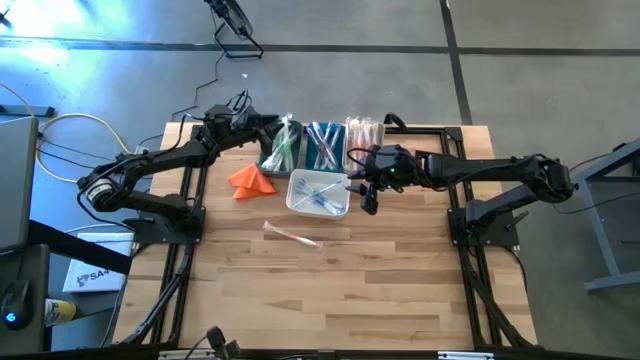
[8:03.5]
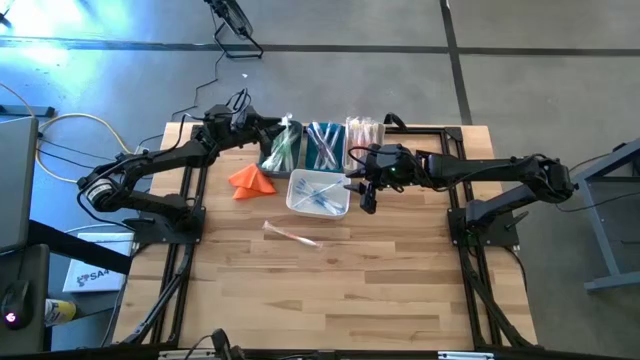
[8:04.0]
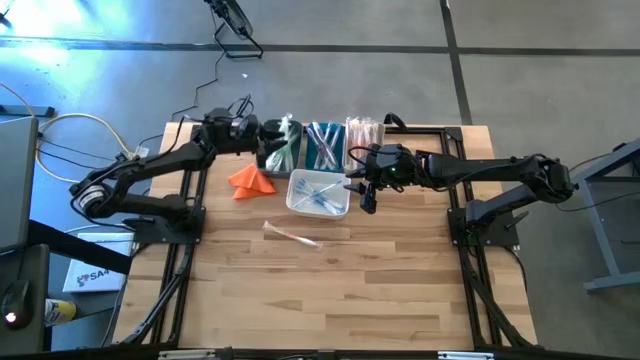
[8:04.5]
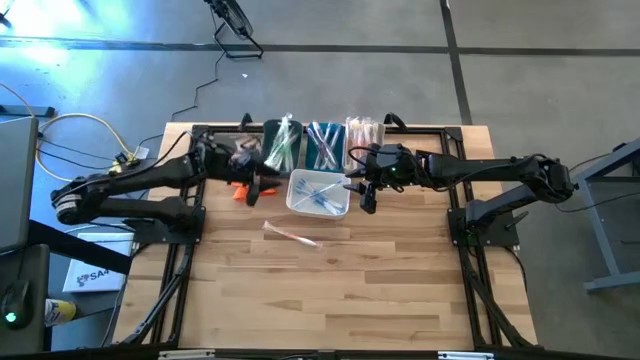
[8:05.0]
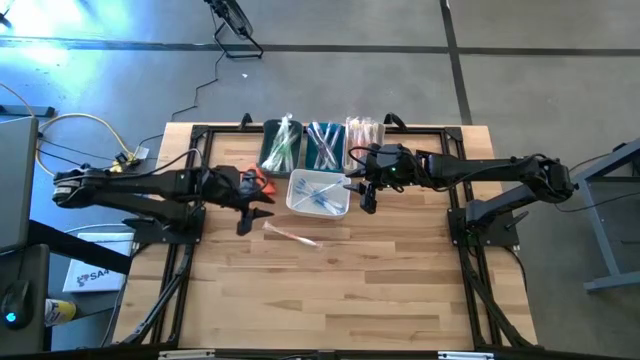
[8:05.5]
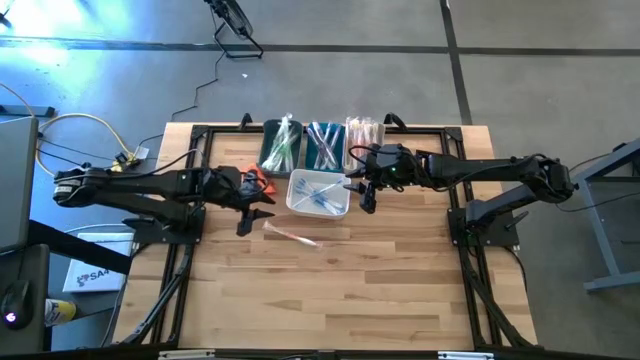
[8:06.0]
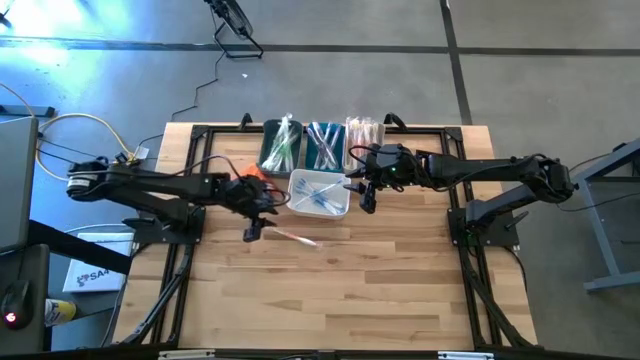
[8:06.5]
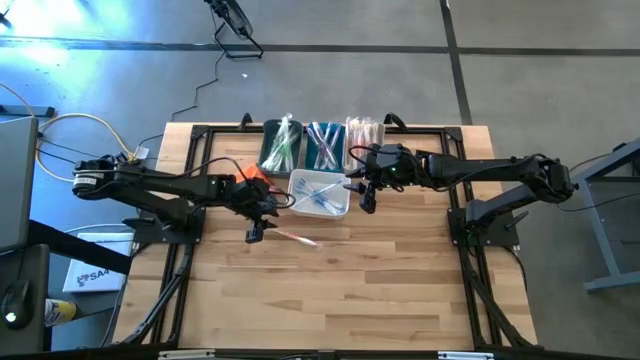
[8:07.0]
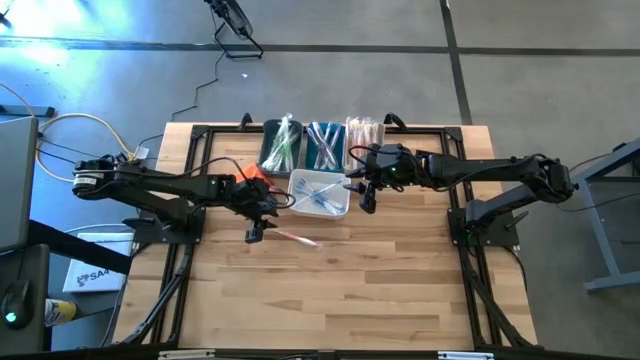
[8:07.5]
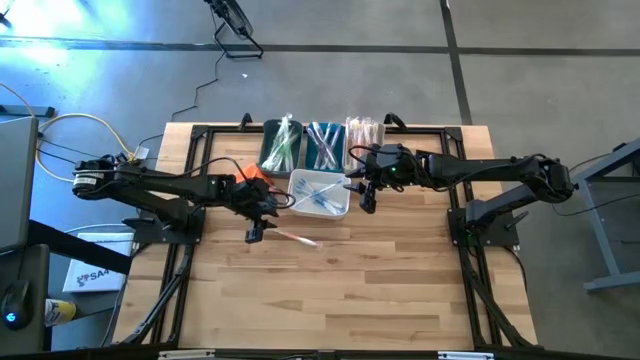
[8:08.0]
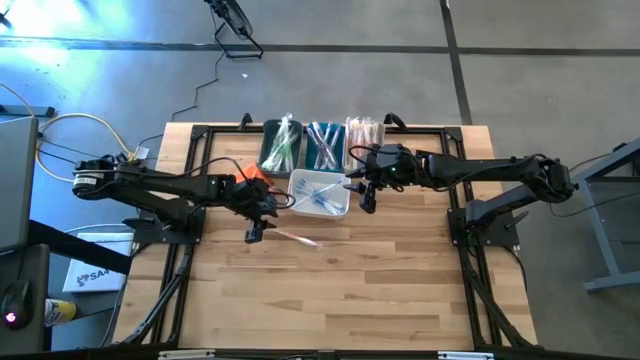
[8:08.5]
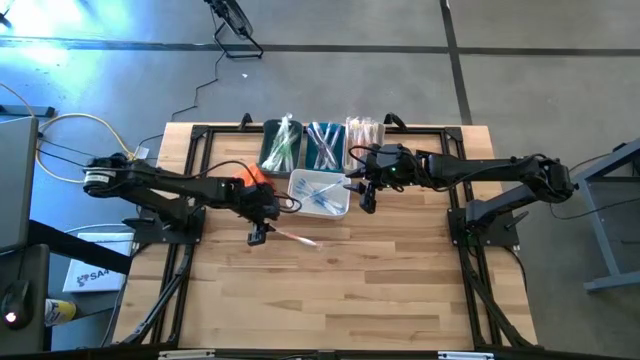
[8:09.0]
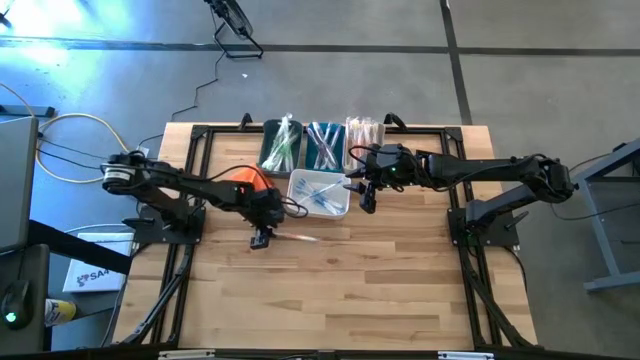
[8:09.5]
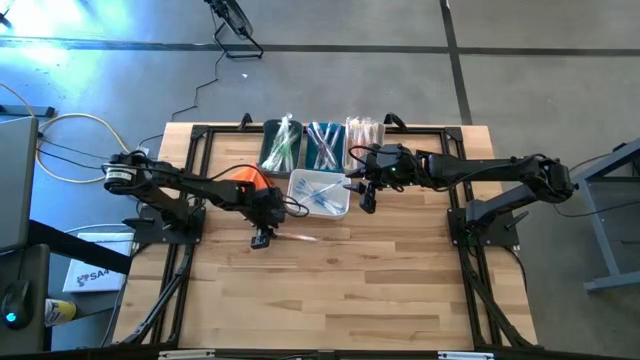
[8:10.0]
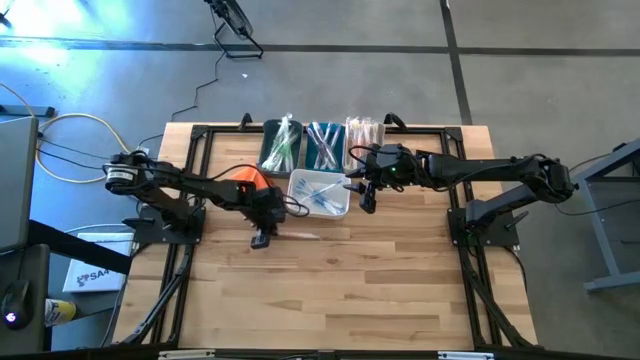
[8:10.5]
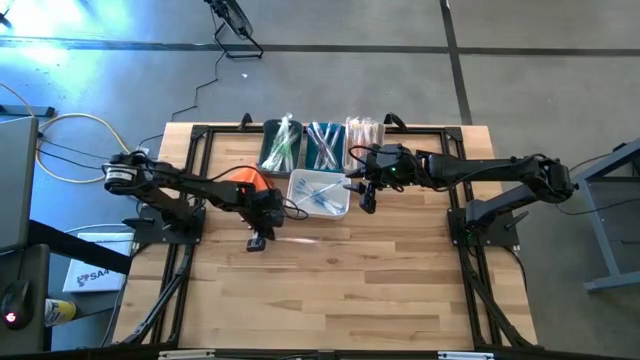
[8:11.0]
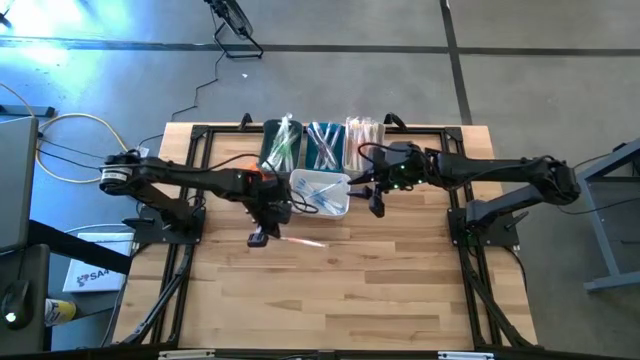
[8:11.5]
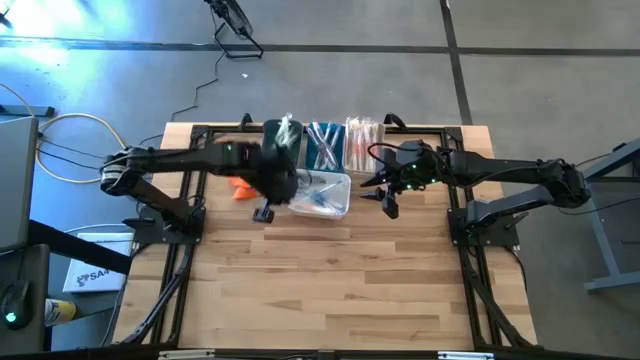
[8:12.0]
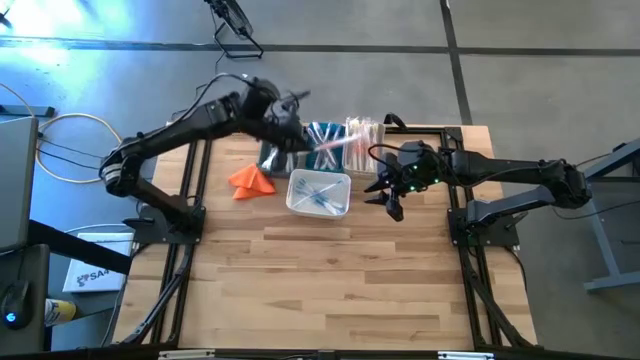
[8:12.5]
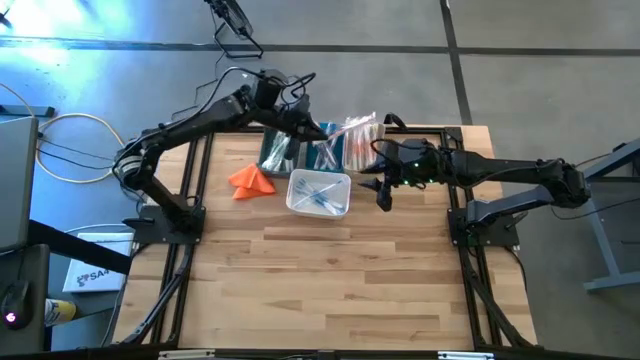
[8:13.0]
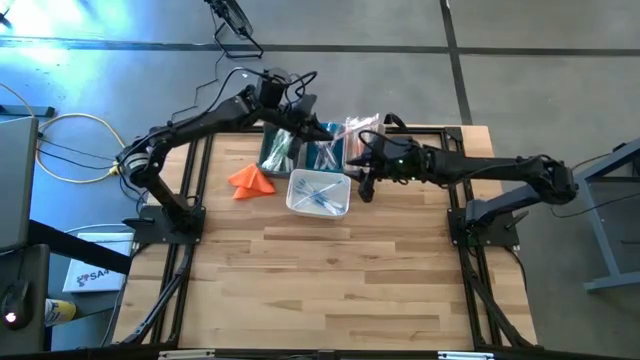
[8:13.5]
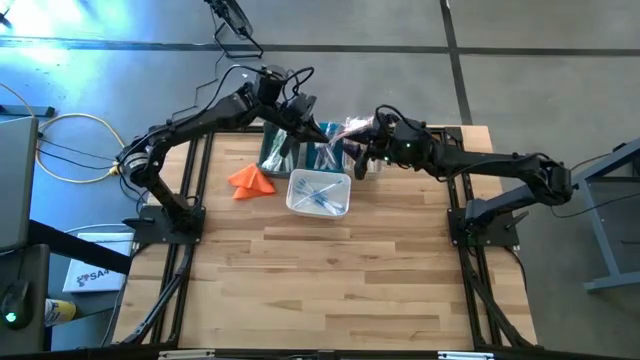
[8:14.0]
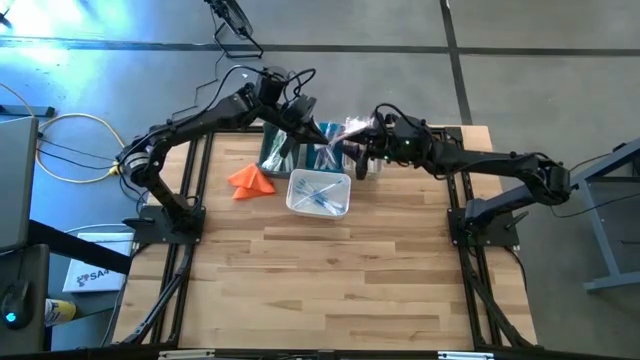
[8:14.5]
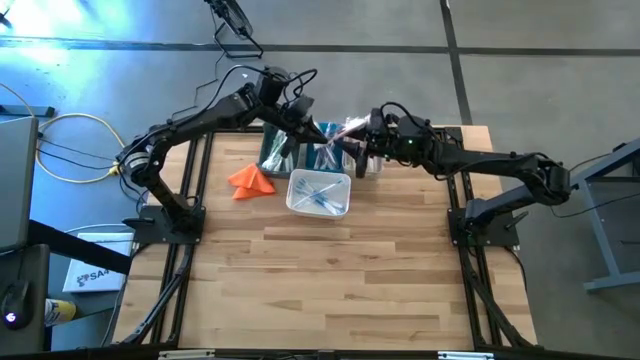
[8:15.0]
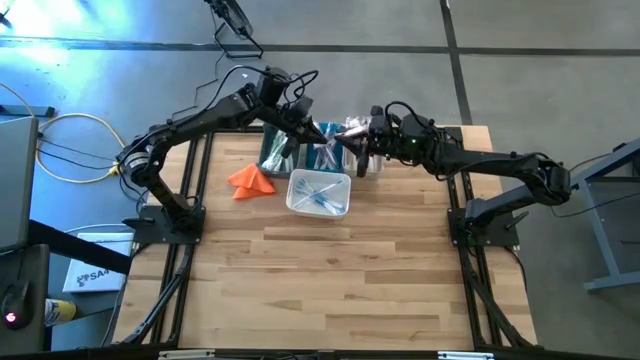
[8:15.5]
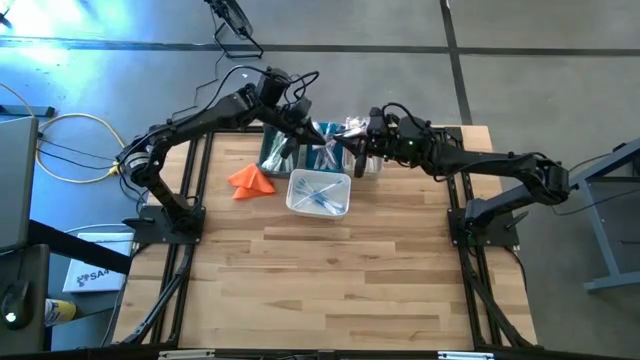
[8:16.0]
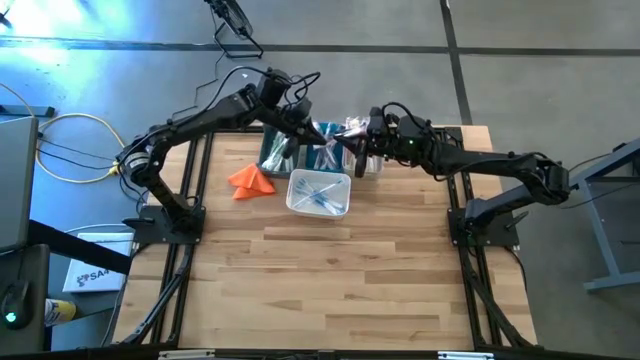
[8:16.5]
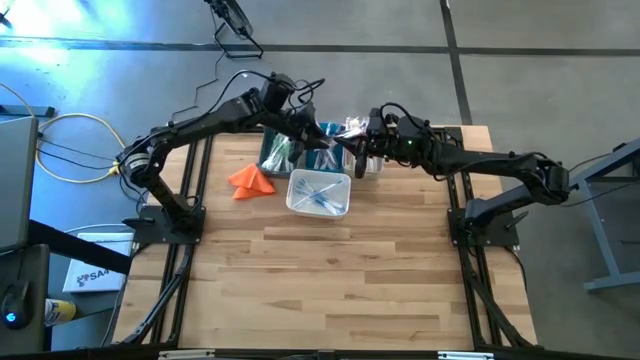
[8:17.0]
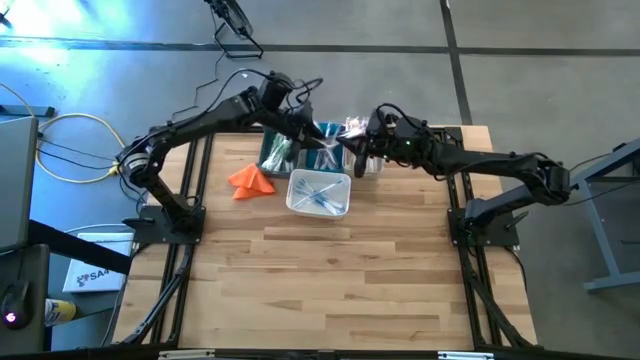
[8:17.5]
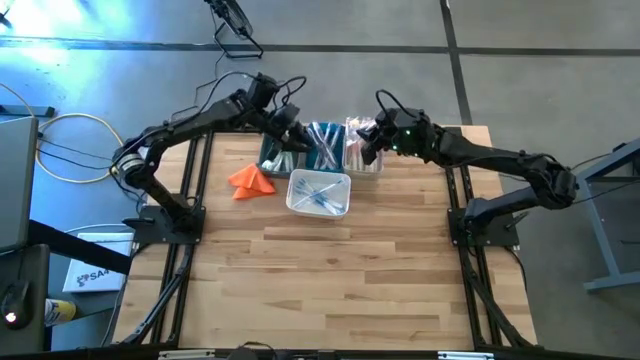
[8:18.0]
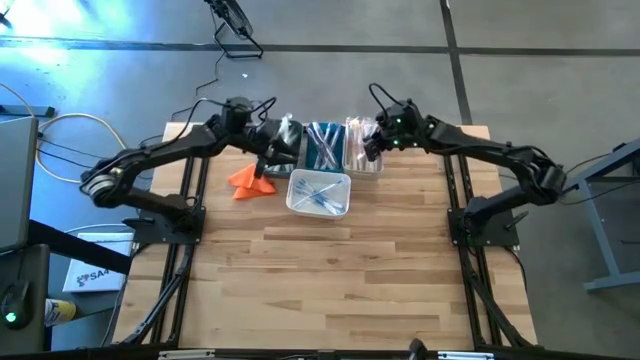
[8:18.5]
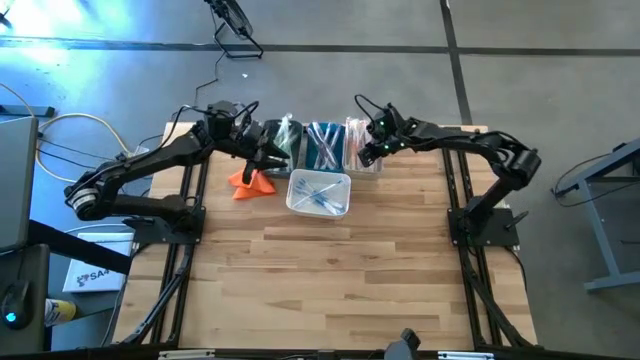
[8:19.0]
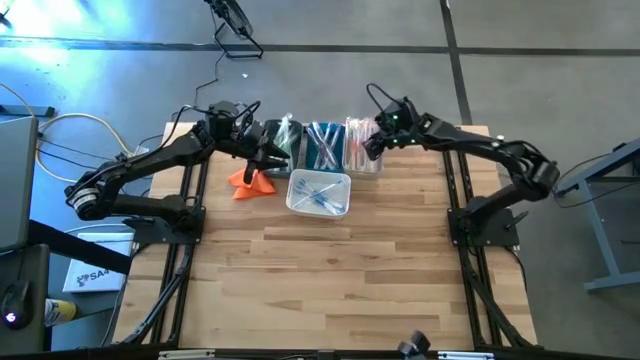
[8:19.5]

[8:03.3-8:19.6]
Task: Pick & Place Toothbrushes
Put the orange toothbrush into the gray bin

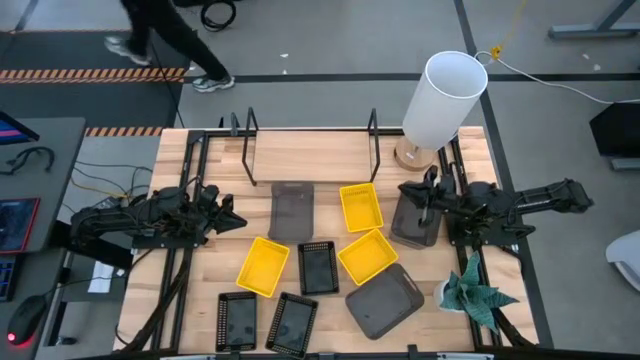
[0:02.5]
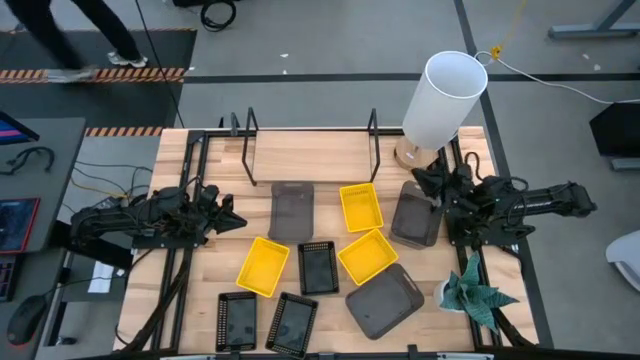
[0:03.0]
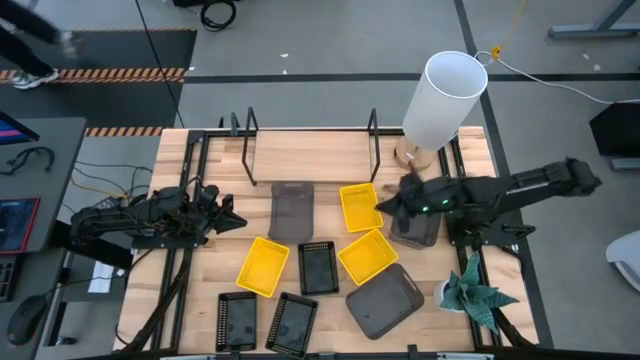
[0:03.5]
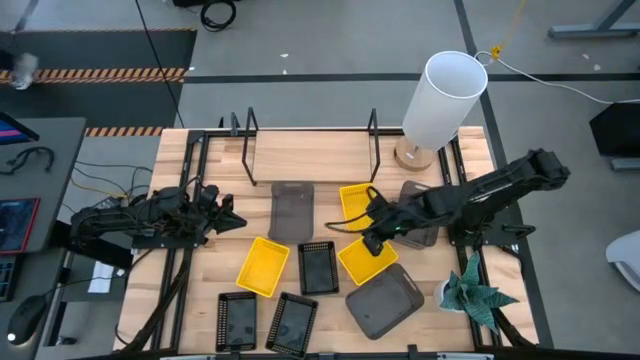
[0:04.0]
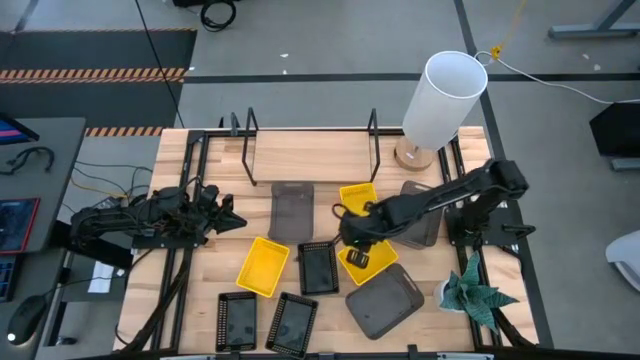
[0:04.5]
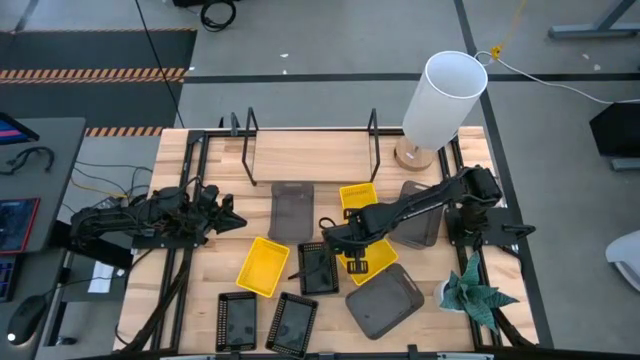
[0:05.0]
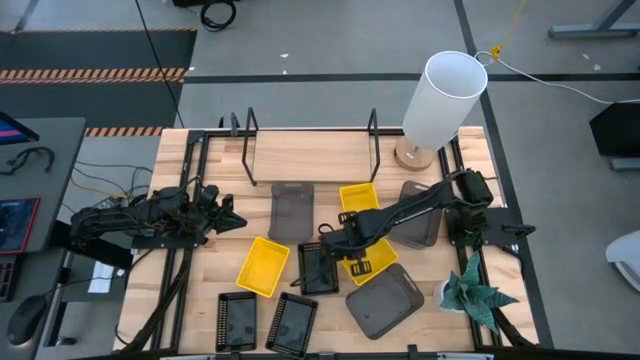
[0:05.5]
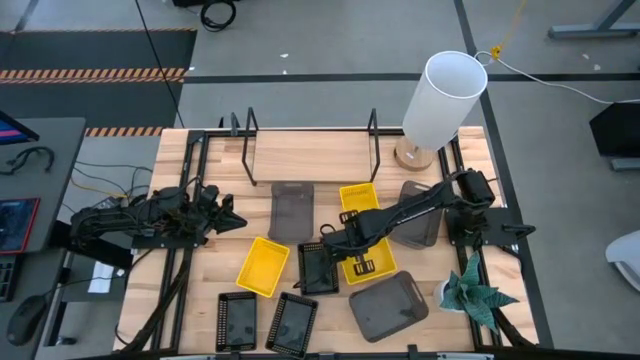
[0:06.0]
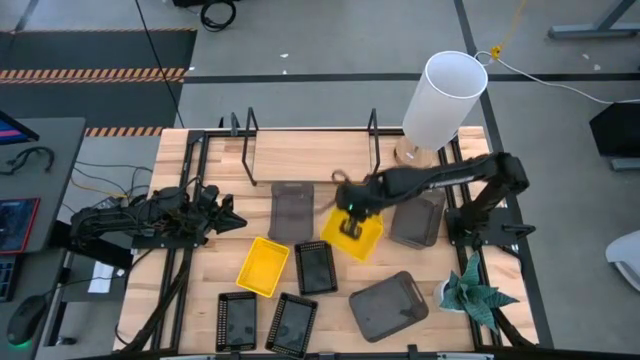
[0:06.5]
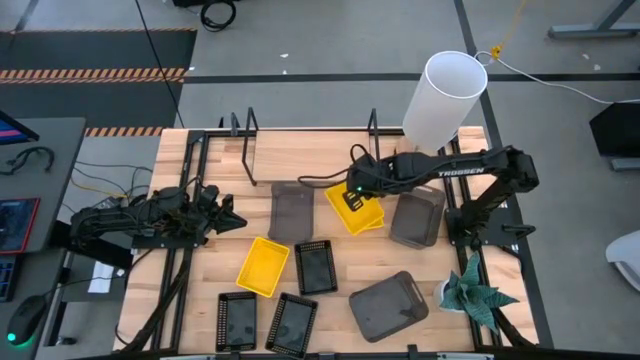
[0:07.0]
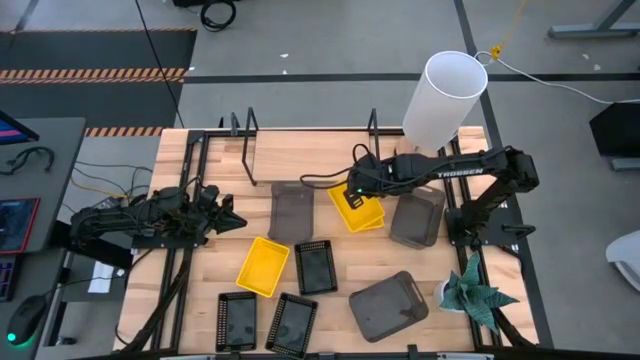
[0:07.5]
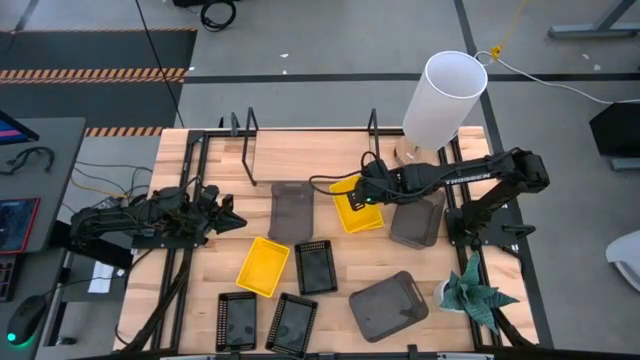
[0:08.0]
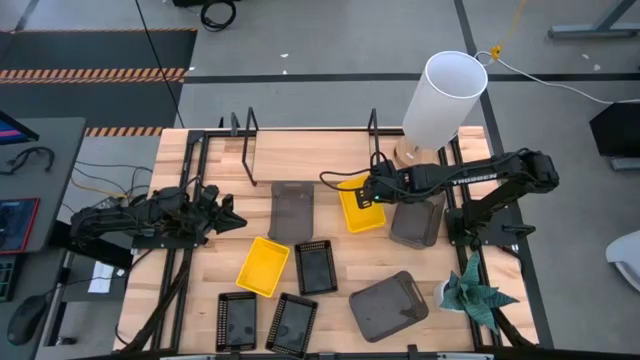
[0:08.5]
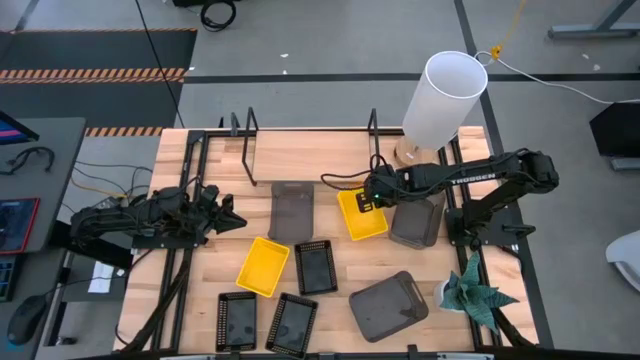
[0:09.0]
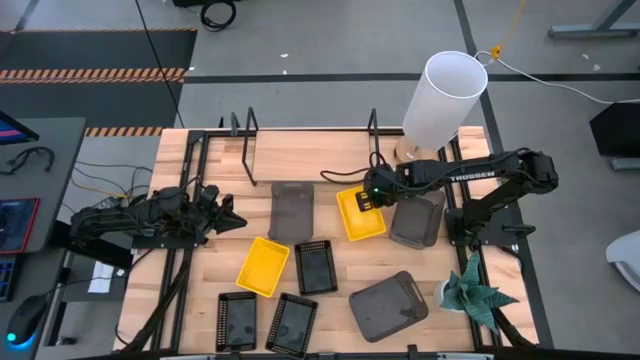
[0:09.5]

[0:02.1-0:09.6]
Task: Stack baskets on shelf by color
Stack the bottom right yellow bin into the yellow bin
